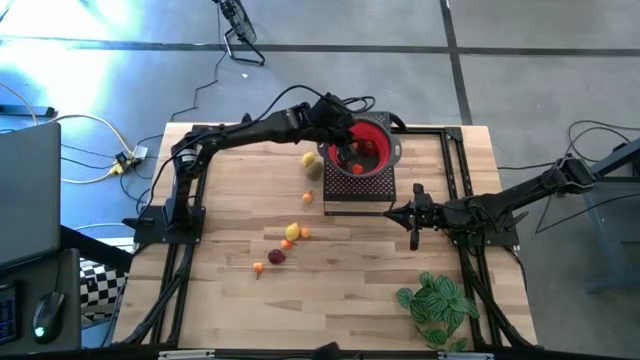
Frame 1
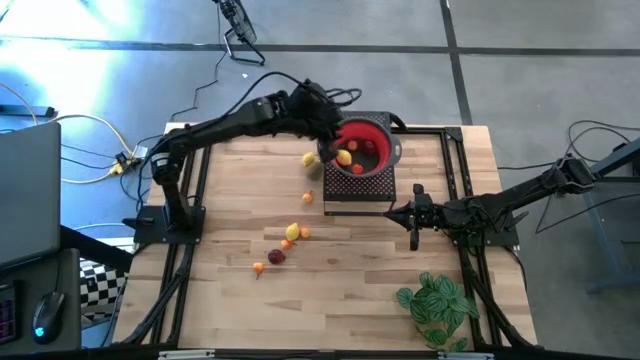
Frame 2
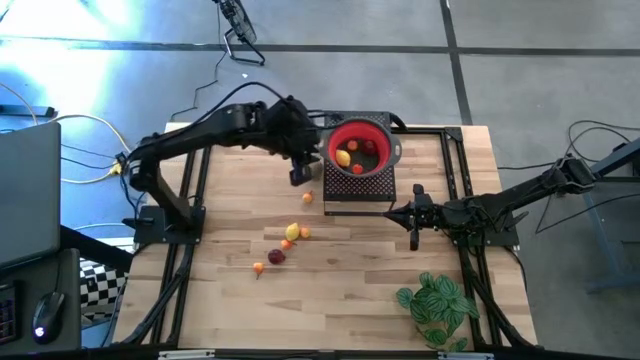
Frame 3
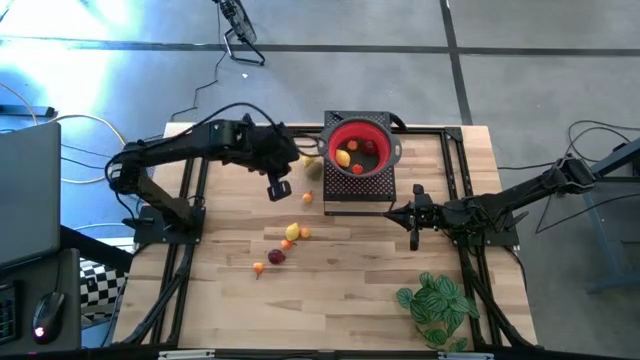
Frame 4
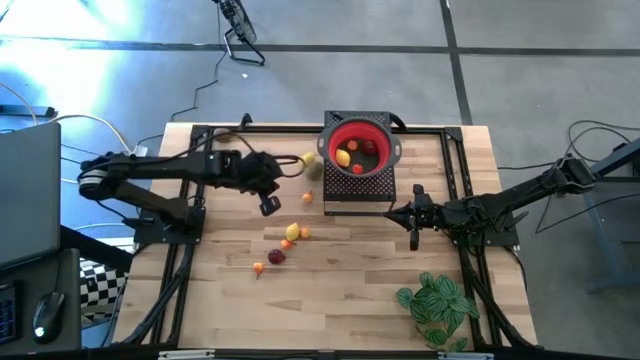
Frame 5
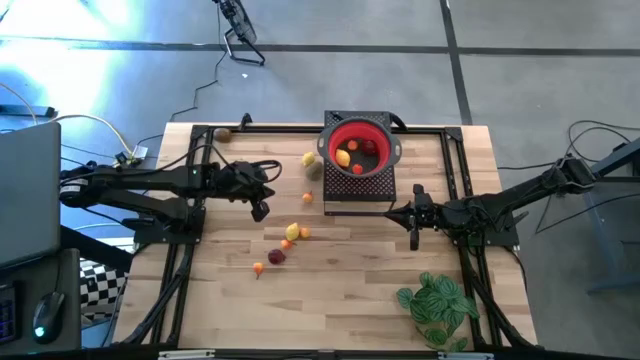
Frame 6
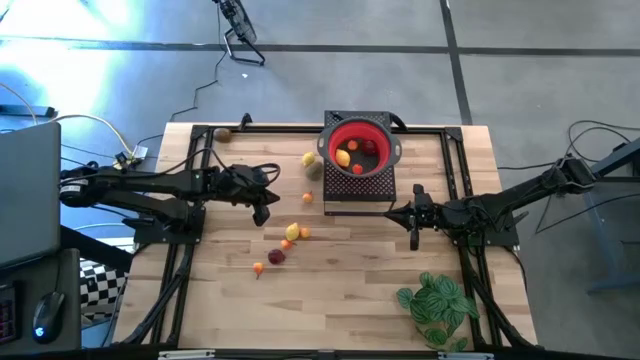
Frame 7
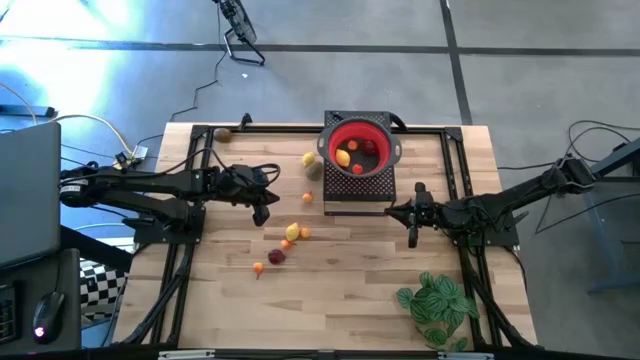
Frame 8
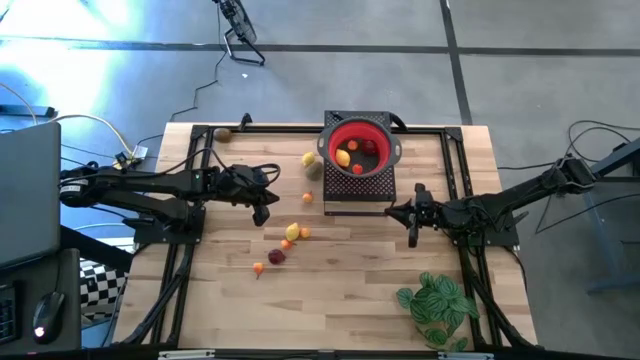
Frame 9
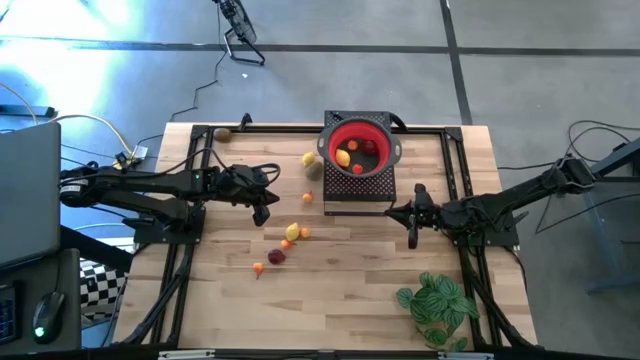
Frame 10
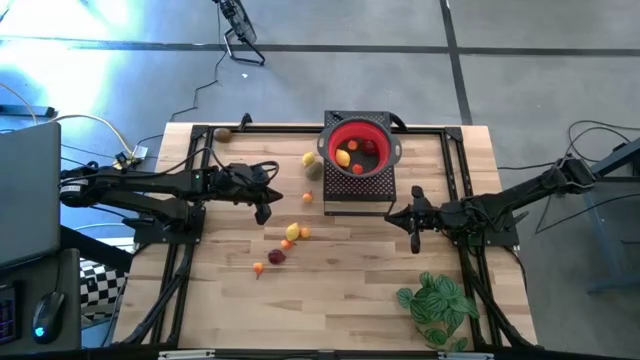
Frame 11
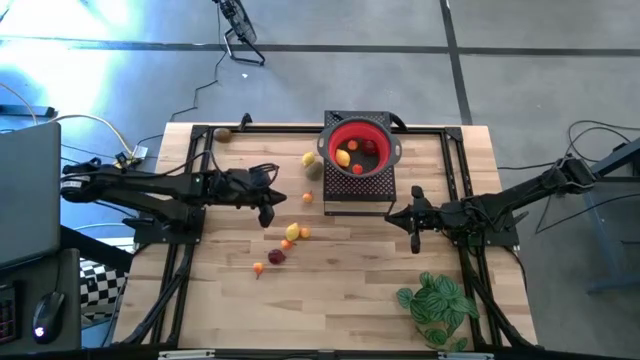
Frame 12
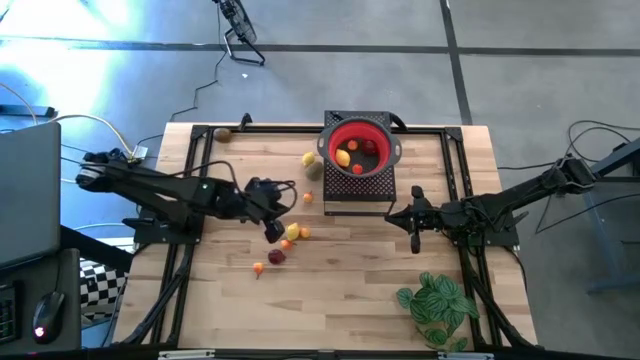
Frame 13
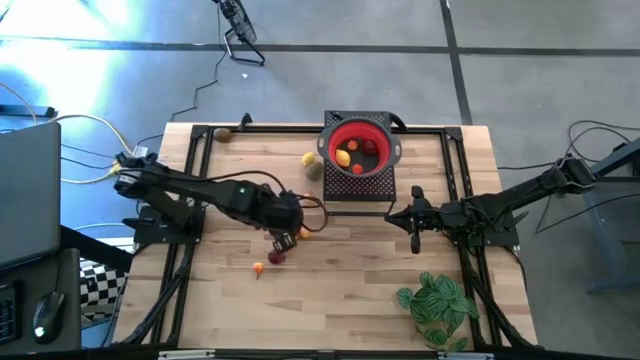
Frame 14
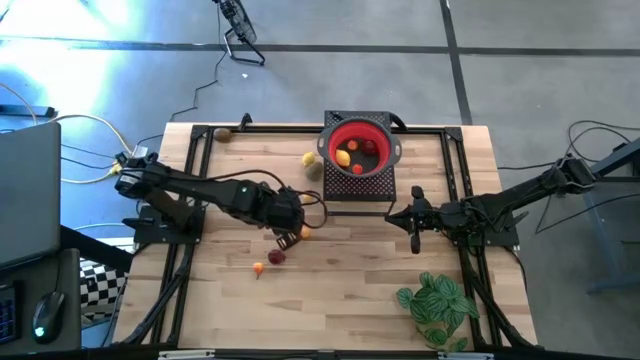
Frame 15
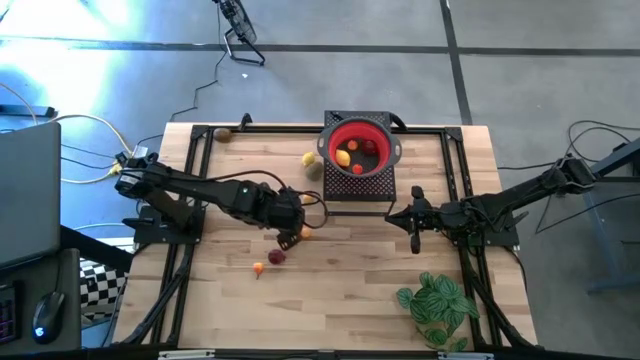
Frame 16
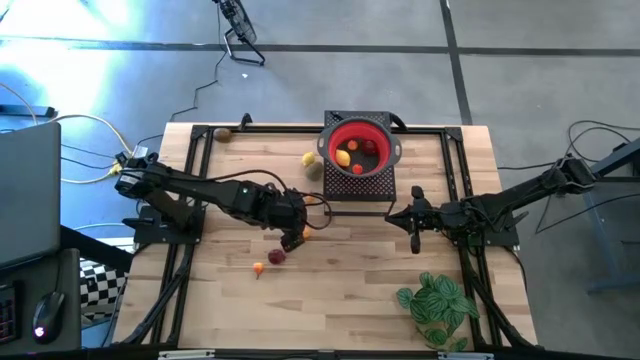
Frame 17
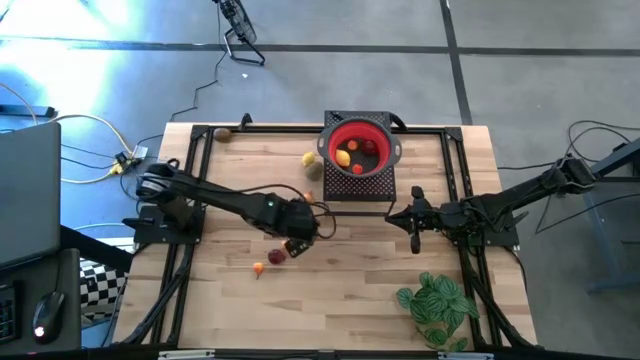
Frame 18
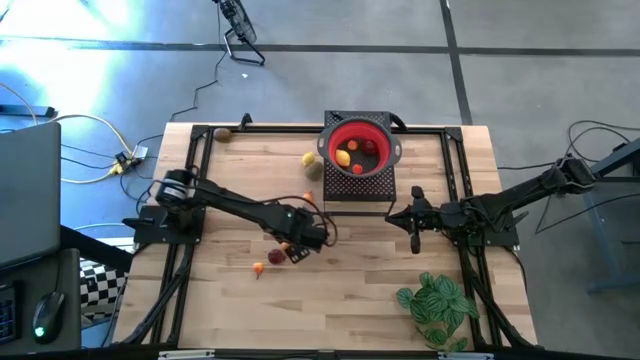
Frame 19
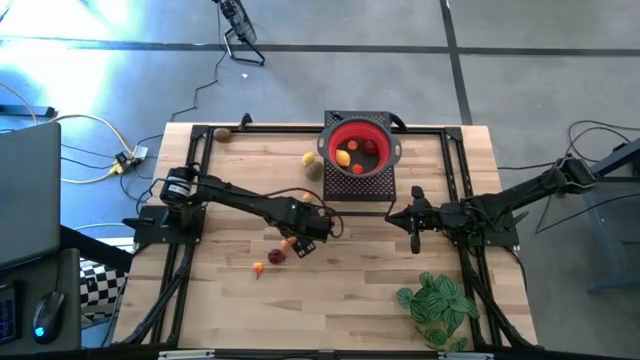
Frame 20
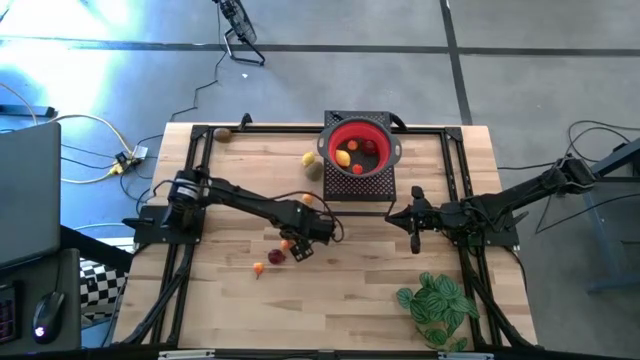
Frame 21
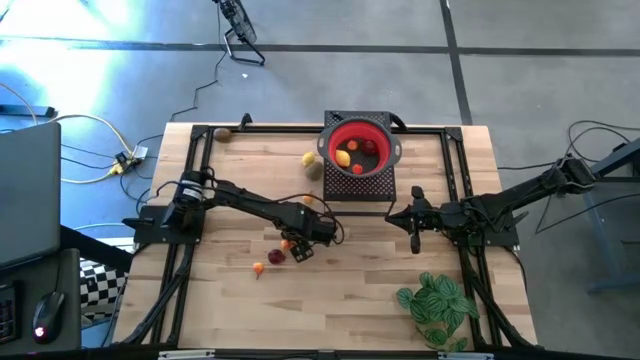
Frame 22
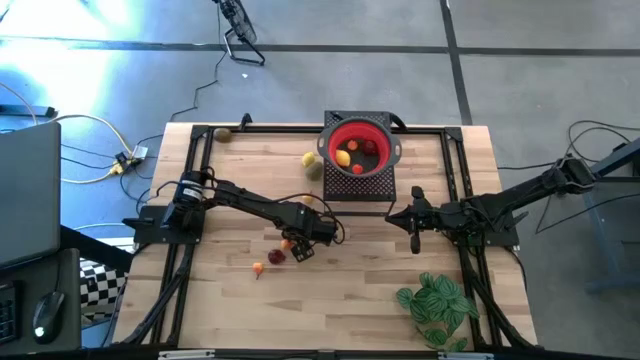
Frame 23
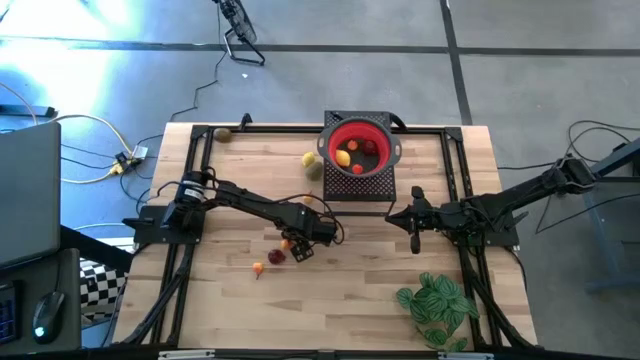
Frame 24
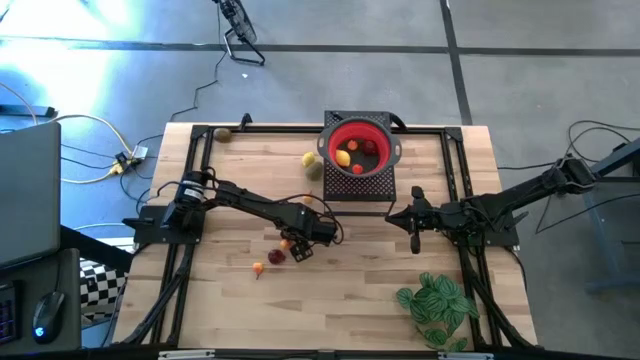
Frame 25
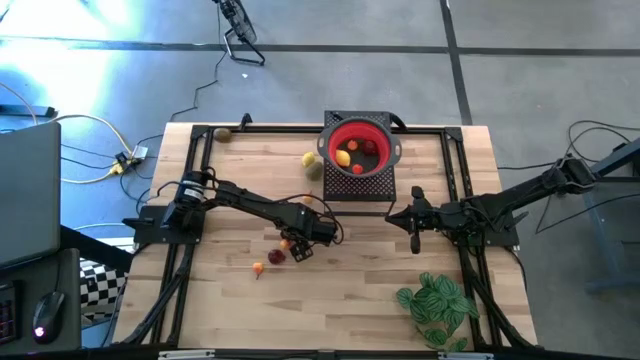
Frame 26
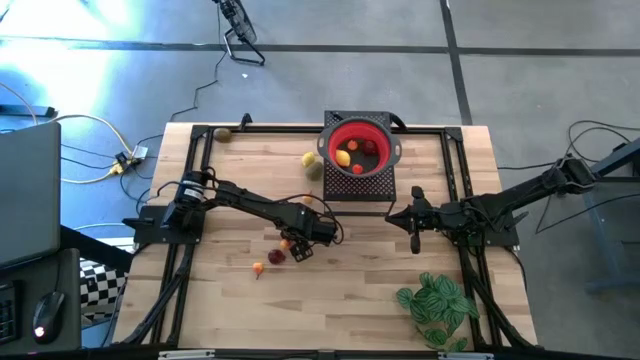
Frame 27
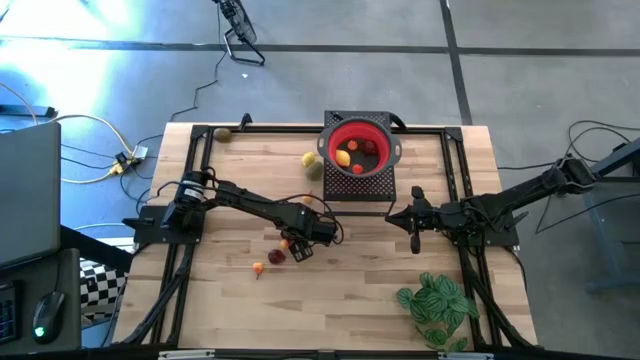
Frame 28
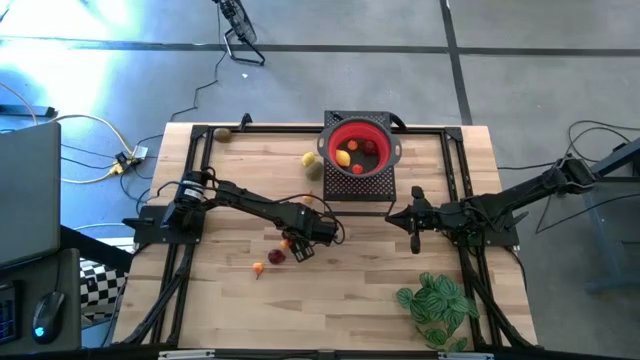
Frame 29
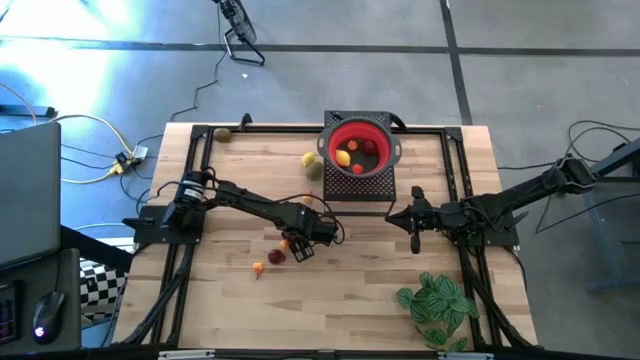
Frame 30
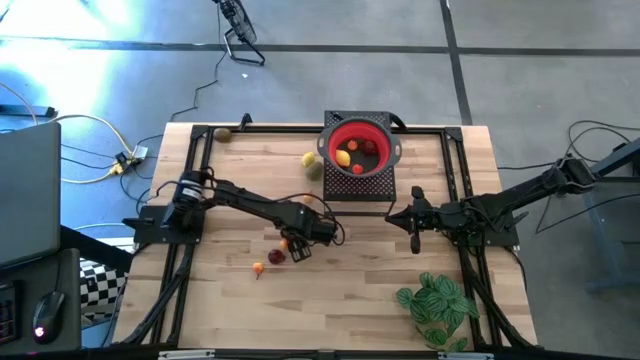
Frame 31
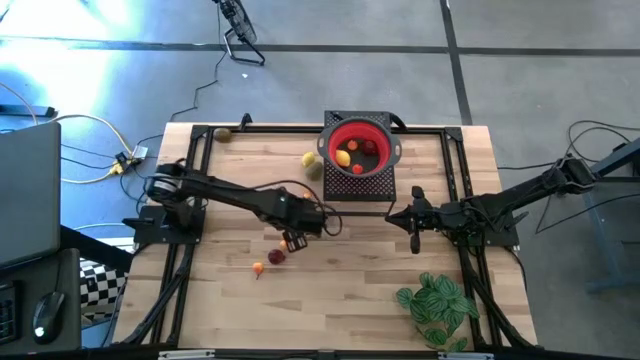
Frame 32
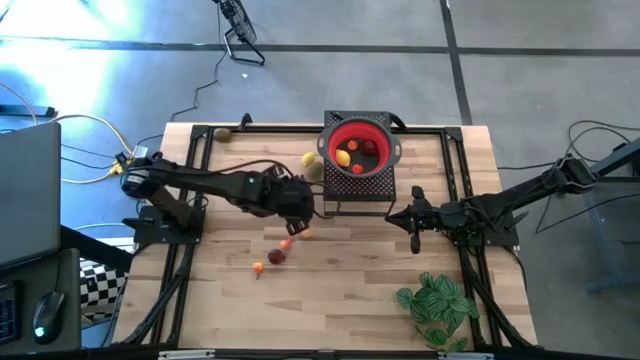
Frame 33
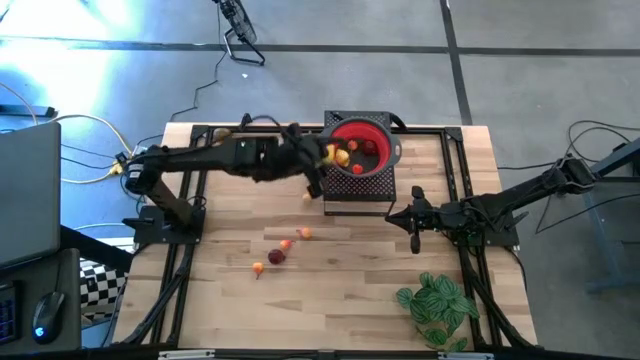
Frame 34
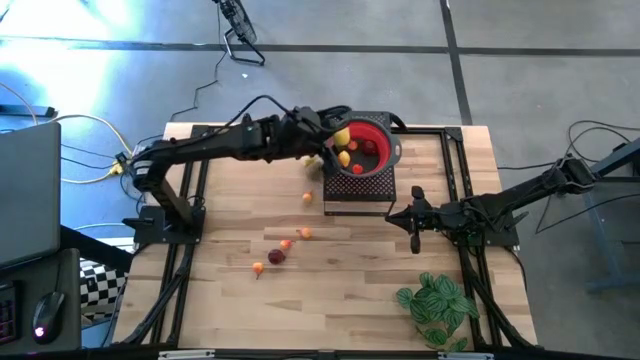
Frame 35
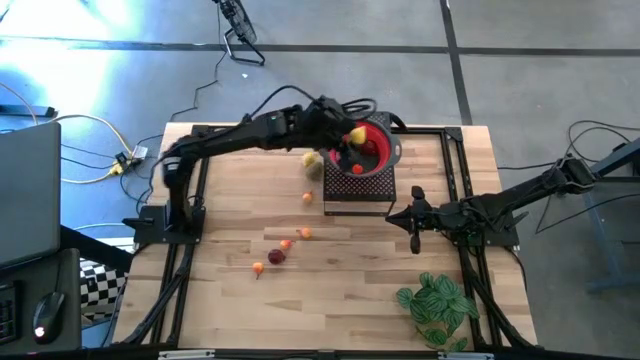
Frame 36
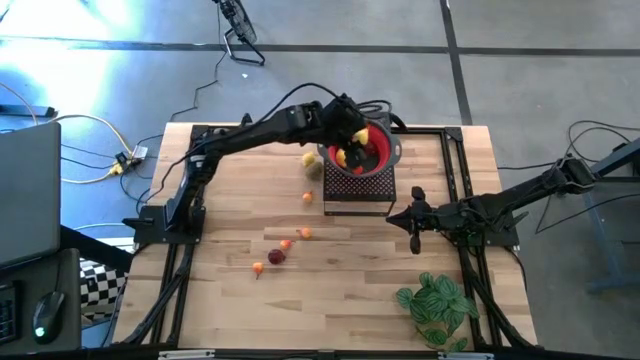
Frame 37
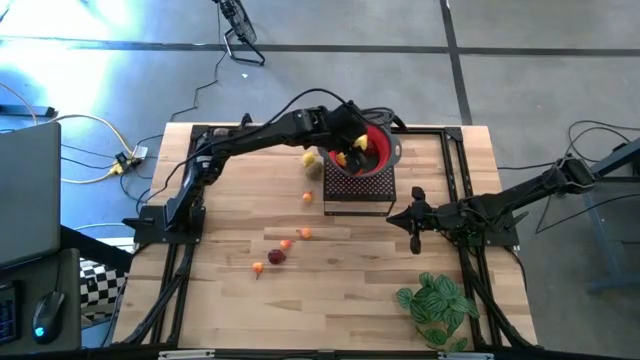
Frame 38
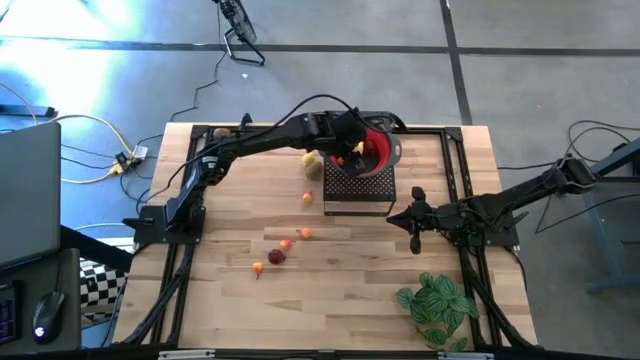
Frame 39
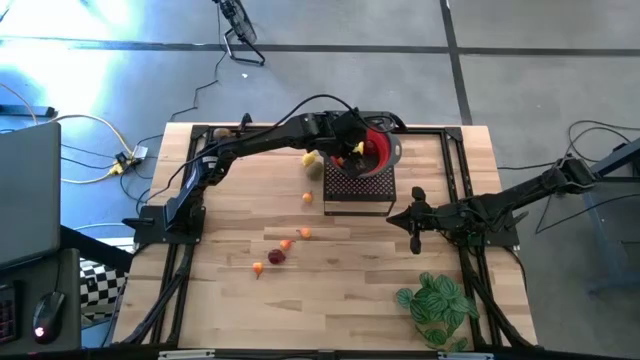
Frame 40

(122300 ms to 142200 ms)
Task: Pick & Place Fruit
Put the bottom yellow lemon into the red strainer bowl on the shelf

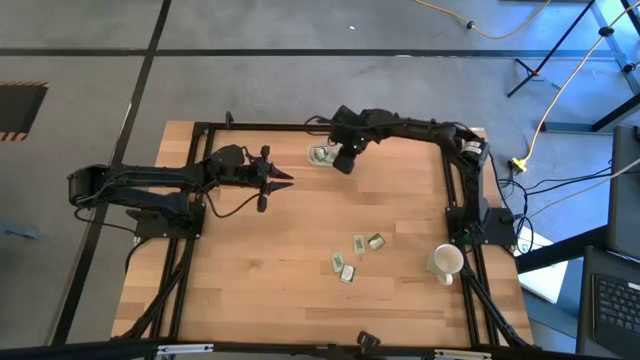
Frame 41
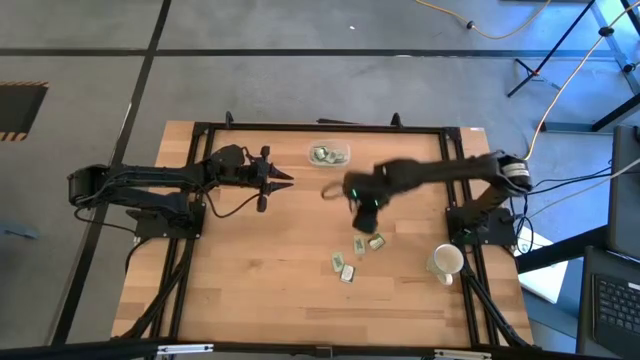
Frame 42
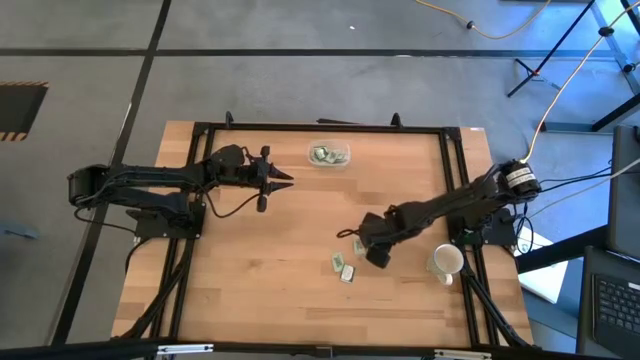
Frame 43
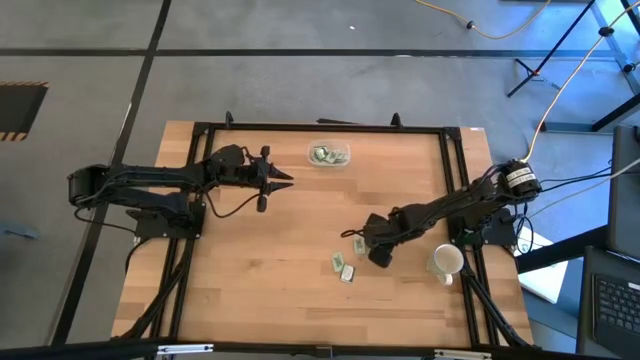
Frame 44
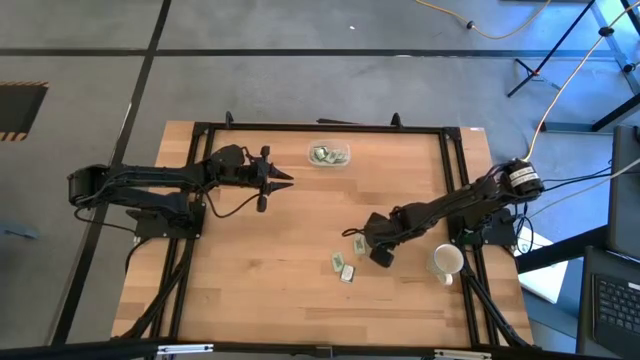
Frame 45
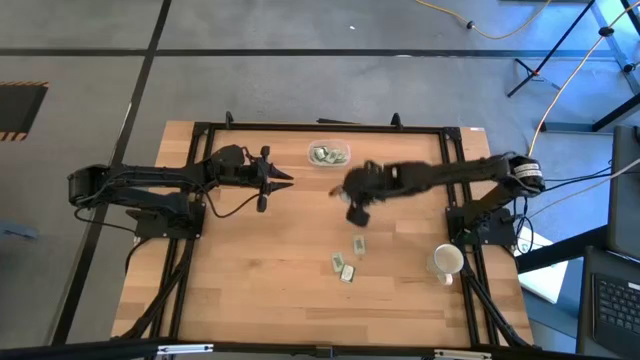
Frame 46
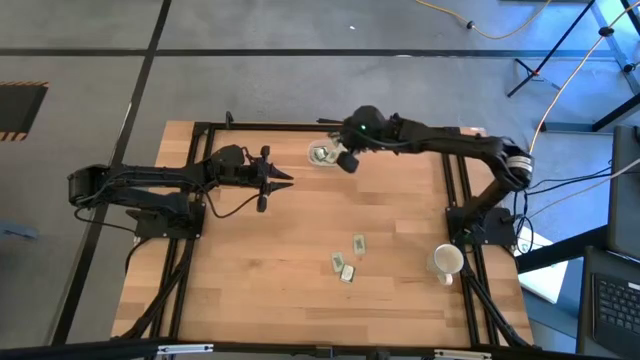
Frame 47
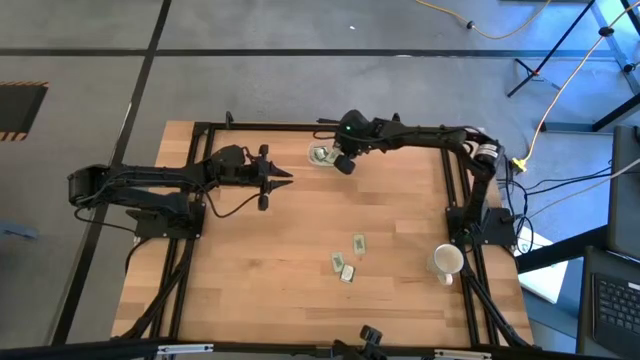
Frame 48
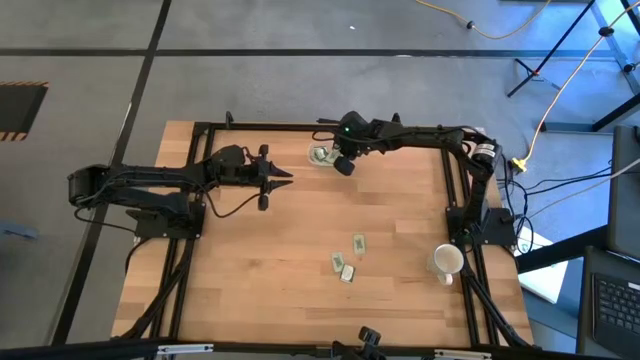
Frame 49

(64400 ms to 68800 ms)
Task: Pick and place items into bin
Put the green stevia packet into the transparent bin
